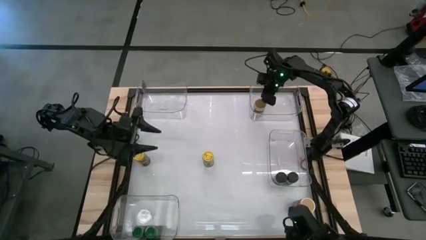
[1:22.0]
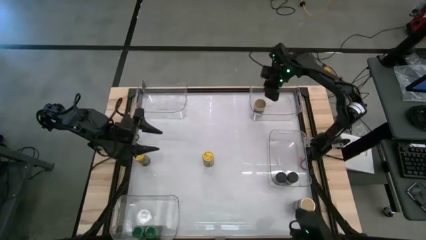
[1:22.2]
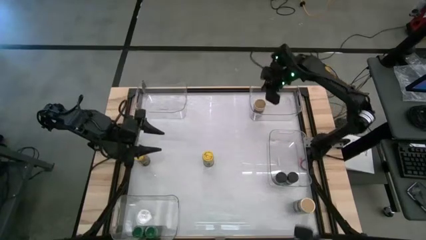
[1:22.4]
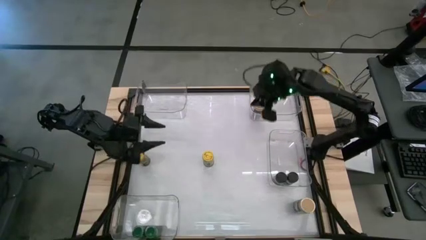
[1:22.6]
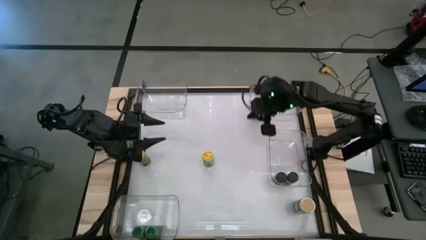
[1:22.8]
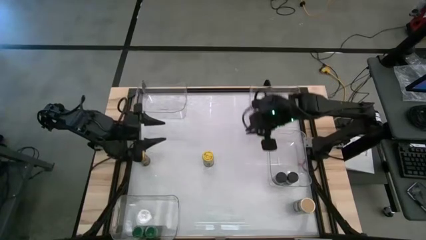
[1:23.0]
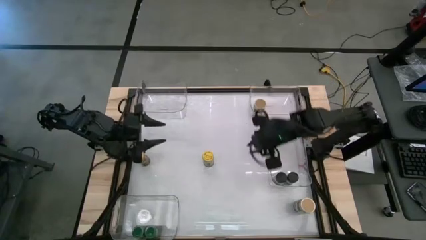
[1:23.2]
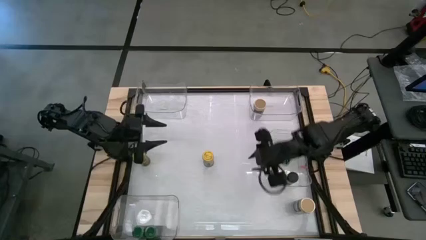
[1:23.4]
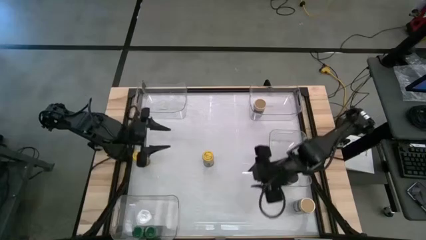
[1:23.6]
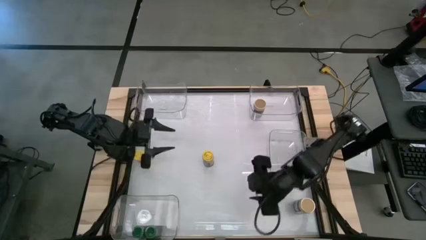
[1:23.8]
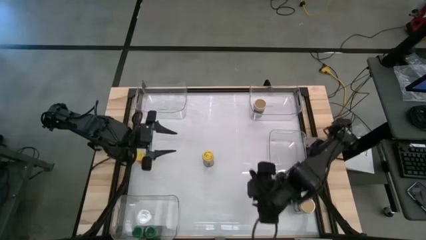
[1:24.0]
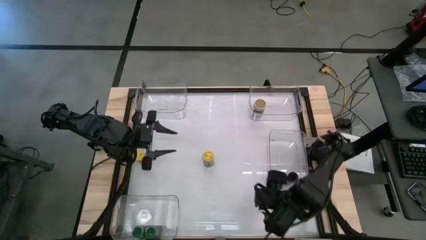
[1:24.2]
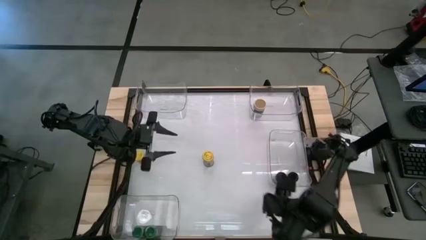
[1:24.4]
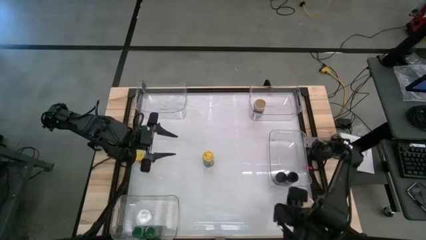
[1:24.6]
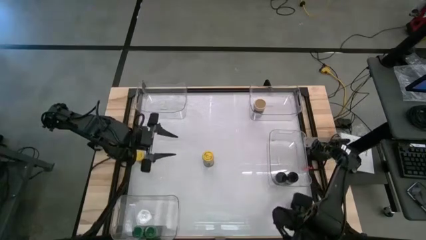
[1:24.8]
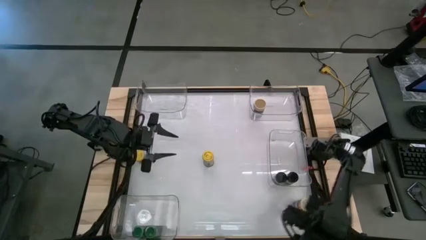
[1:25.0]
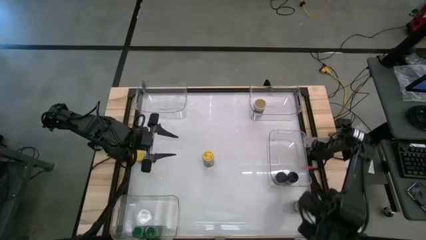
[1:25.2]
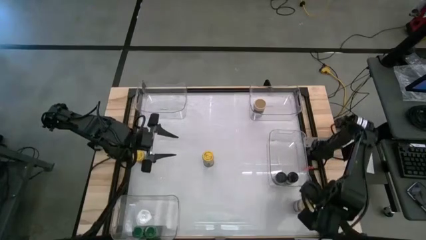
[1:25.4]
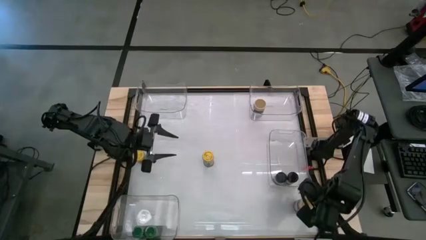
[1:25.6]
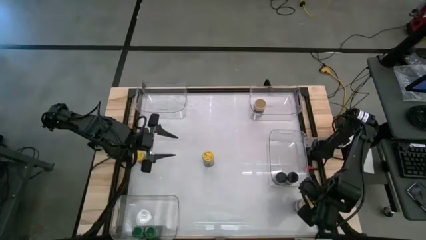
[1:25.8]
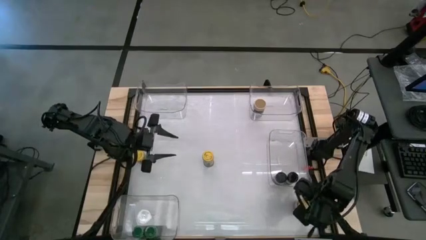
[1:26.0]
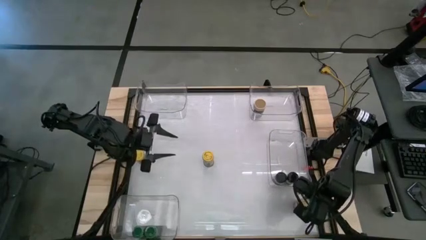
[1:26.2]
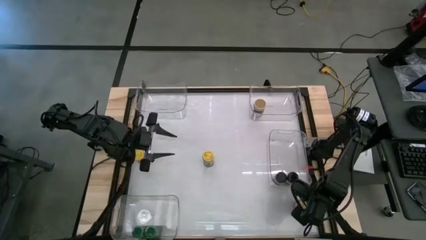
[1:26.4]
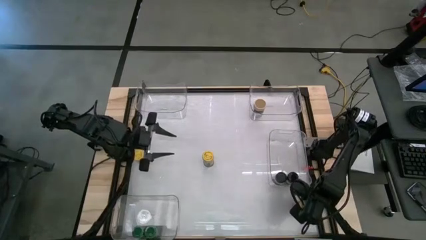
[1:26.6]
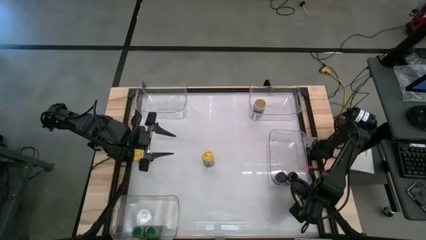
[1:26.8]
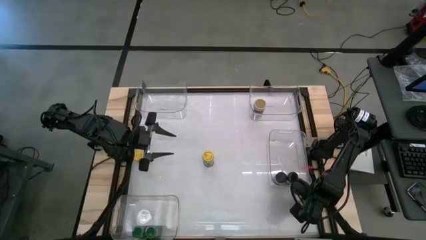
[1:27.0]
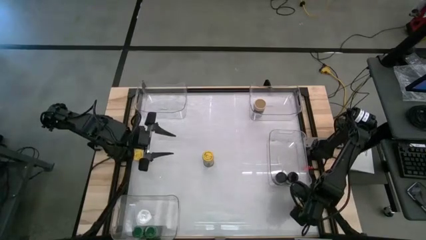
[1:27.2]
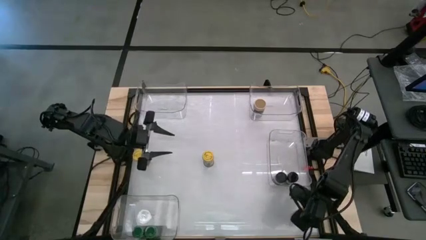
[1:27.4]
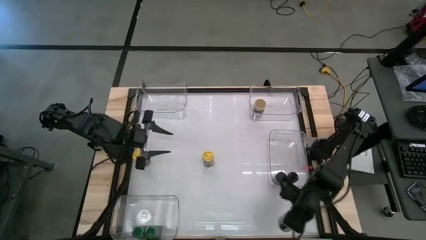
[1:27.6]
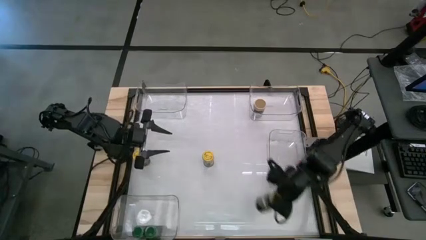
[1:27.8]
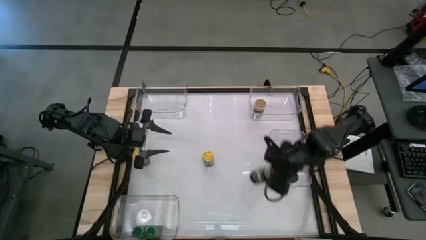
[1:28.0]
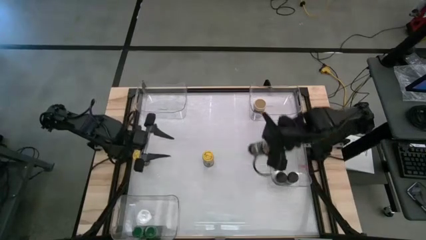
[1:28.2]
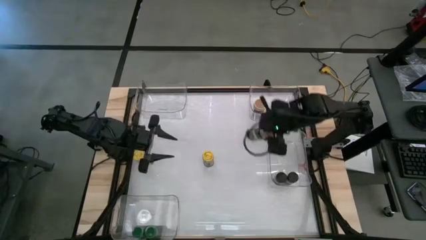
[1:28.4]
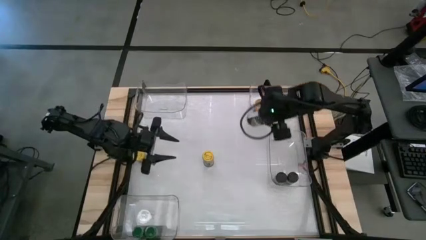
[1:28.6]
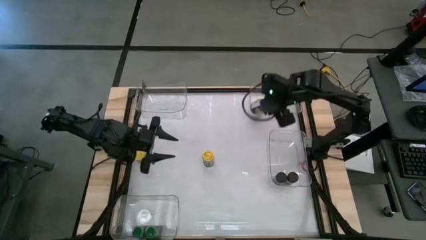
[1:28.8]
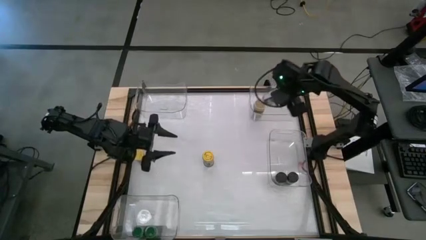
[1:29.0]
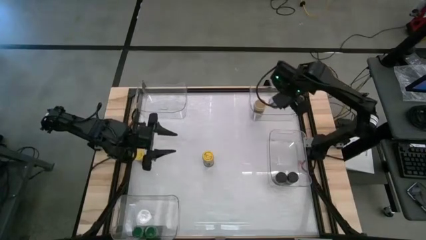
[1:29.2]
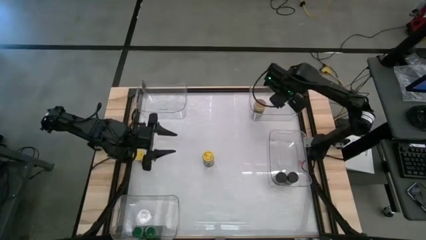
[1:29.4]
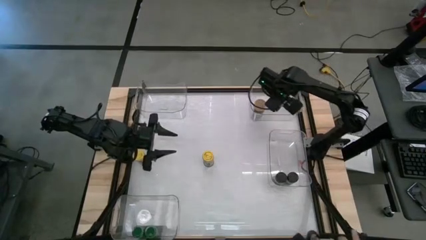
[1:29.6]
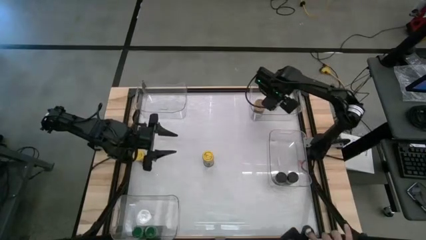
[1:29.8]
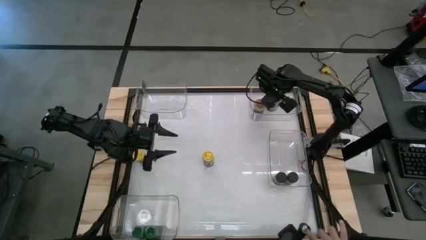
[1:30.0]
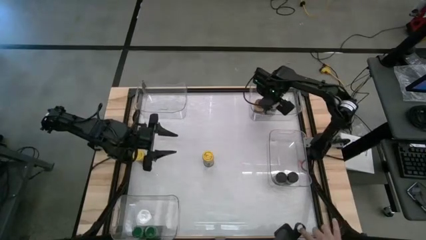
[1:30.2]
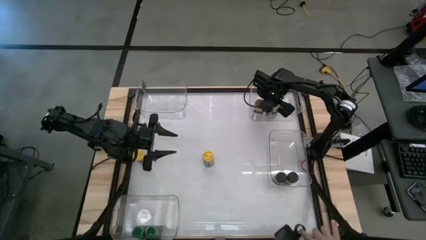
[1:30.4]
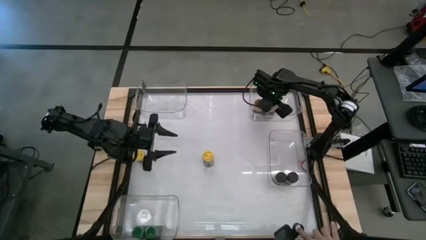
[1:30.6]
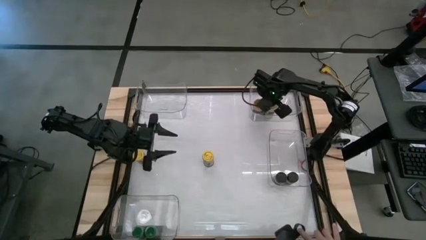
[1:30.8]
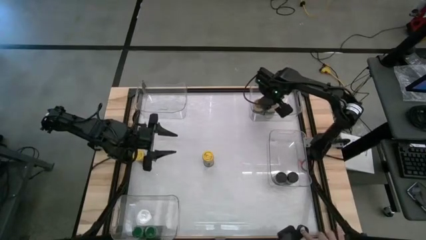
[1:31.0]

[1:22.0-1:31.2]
Task: Sort spices by type
Put the gold seasoning bottle into the top right transparent bin

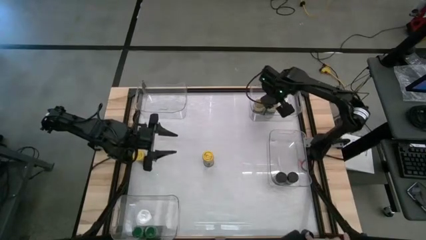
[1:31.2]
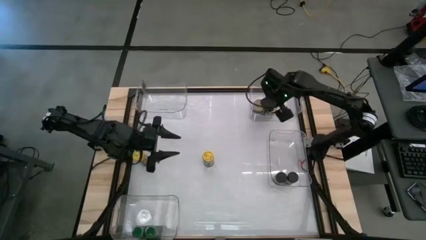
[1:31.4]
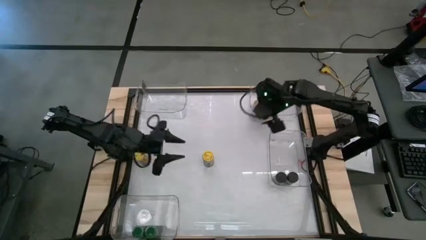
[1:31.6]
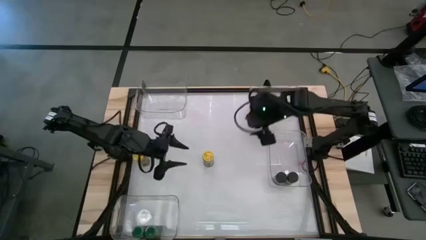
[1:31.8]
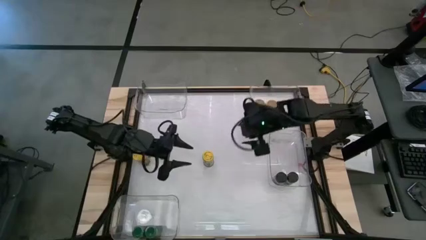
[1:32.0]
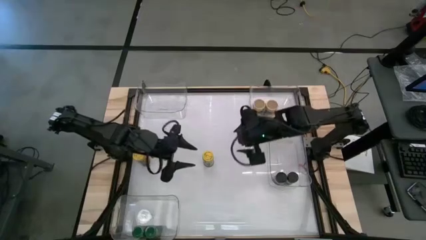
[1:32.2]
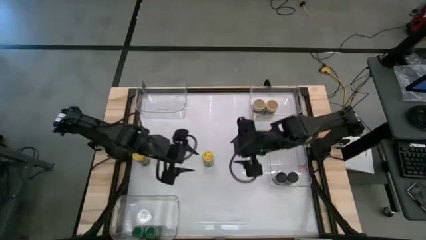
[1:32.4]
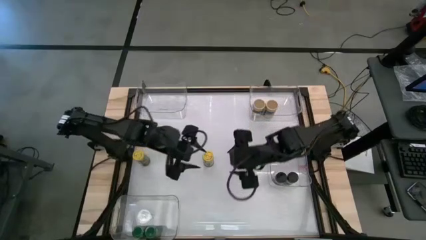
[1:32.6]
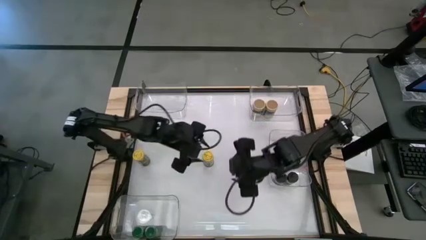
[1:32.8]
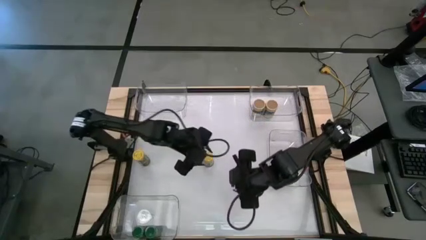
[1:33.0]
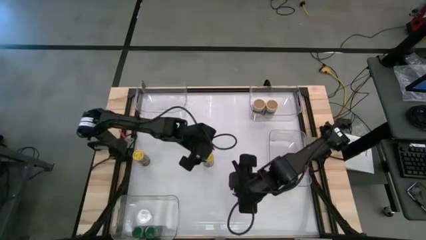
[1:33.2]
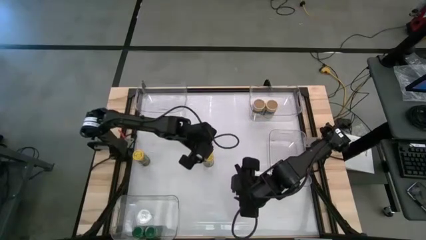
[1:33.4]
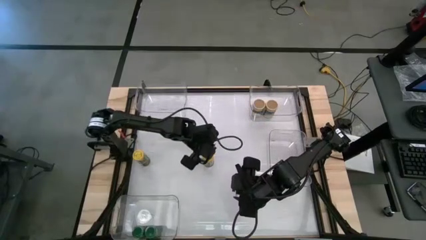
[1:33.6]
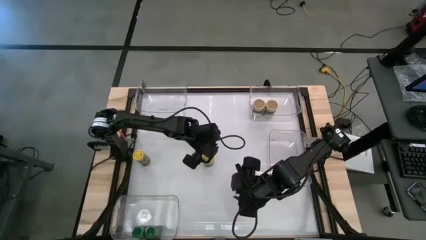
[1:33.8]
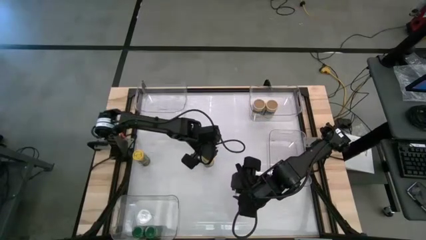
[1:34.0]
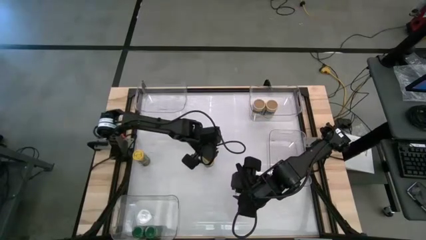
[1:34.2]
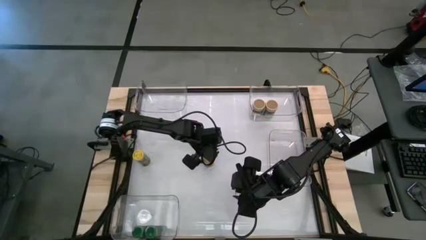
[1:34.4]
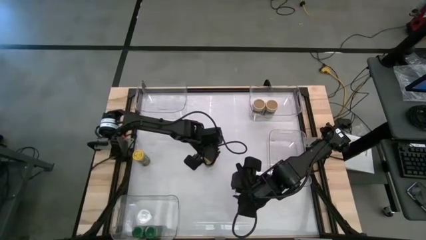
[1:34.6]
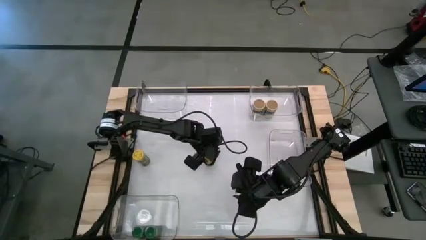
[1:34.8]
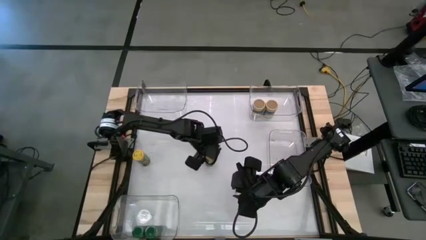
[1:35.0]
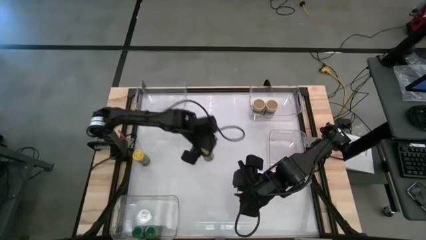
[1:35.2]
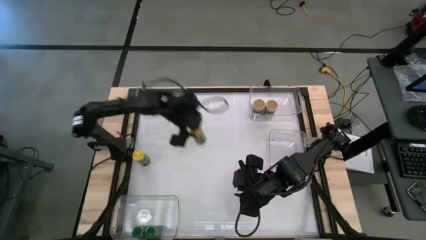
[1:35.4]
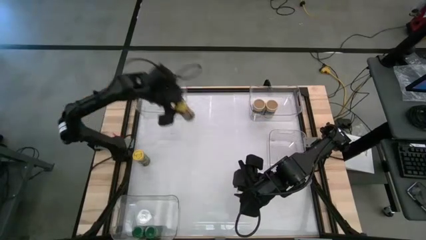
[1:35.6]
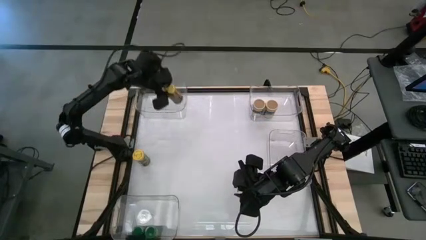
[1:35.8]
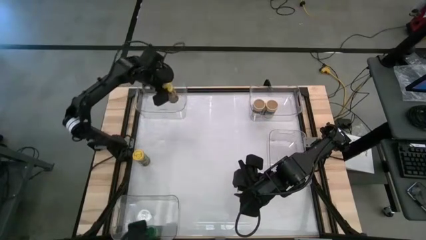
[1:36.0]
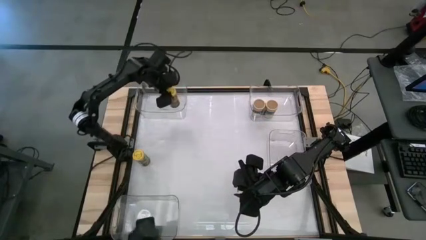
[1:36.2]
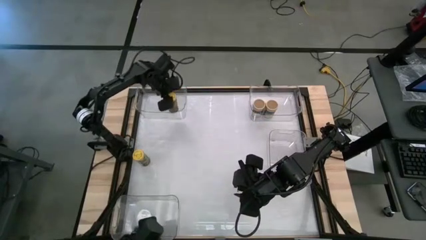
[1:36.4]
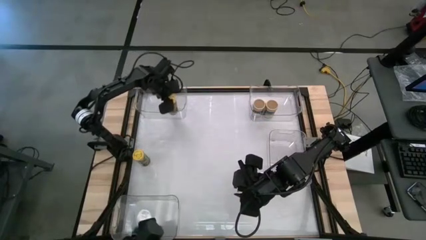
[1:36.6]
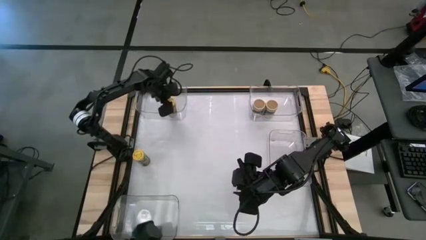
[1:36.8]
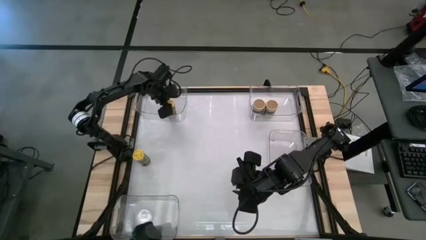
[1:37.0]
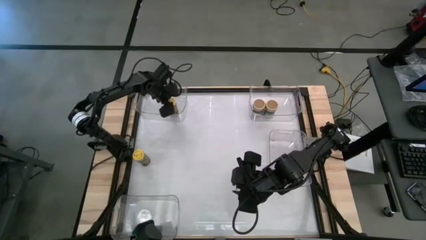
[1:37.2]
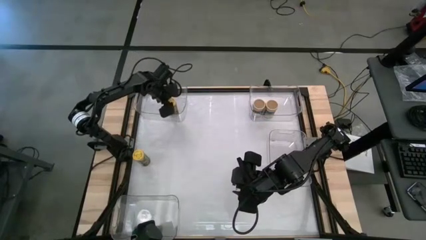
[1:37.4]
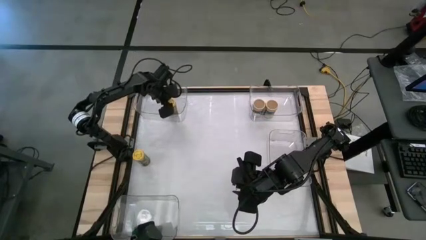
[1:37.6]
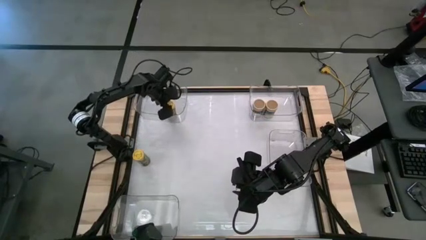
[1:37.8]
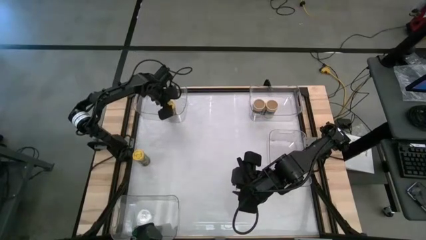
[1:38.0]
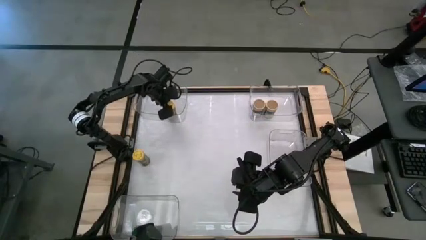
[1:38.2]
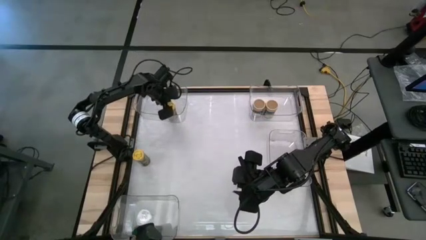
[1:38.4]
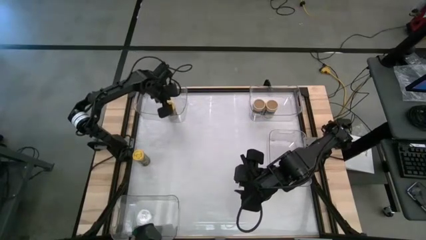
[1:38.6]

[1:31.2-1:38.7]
Put the right yellow seasoning bottle into the top left transparent bin
